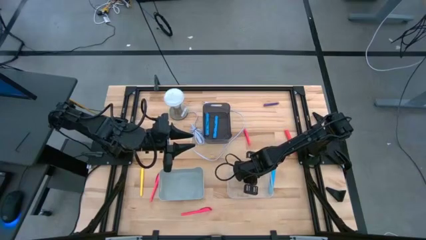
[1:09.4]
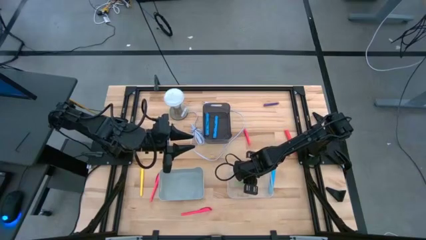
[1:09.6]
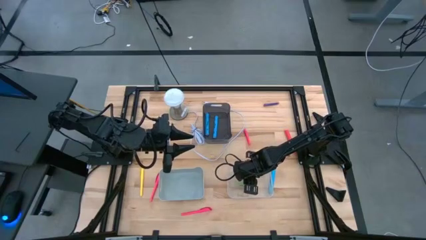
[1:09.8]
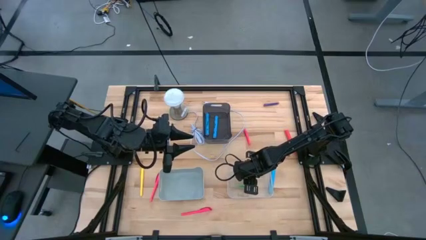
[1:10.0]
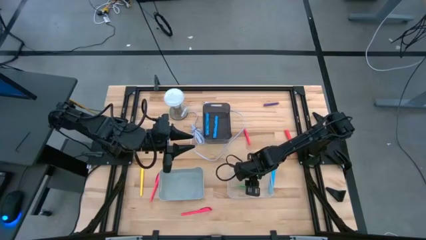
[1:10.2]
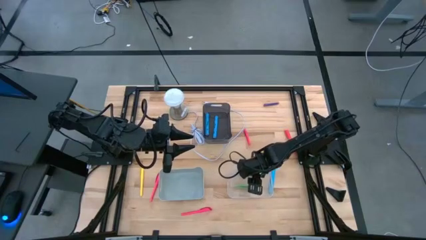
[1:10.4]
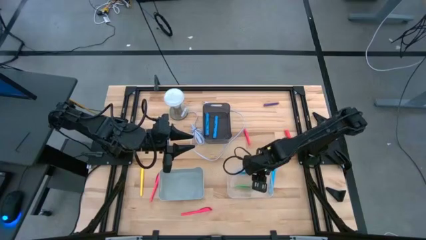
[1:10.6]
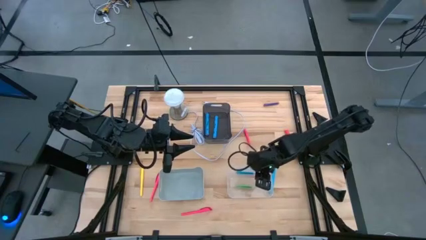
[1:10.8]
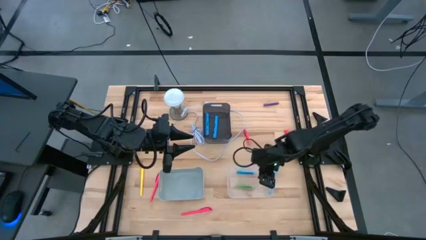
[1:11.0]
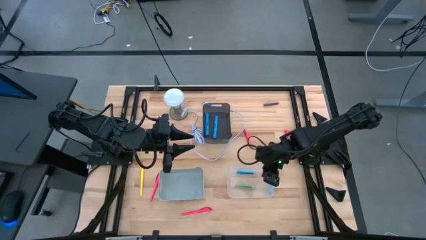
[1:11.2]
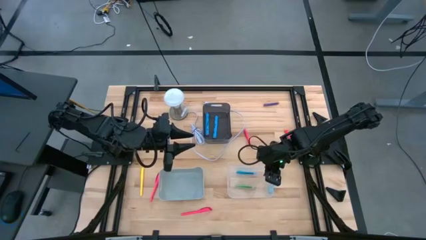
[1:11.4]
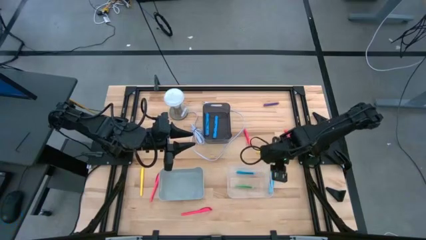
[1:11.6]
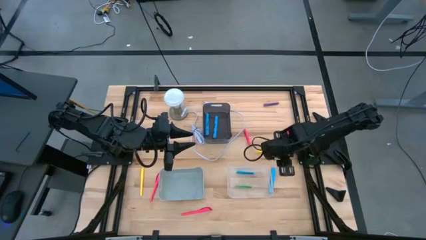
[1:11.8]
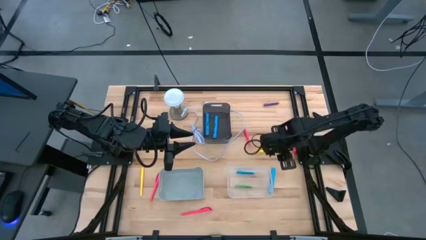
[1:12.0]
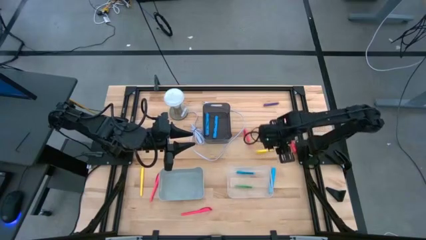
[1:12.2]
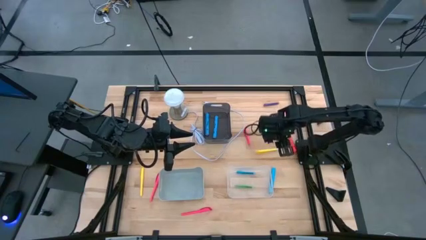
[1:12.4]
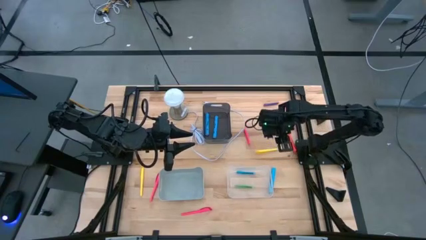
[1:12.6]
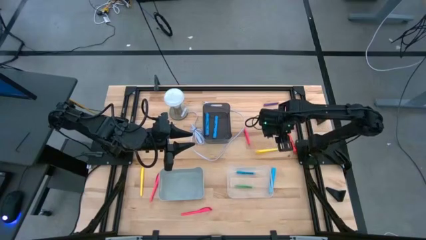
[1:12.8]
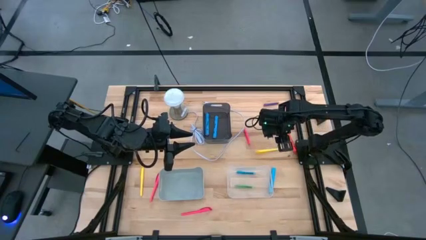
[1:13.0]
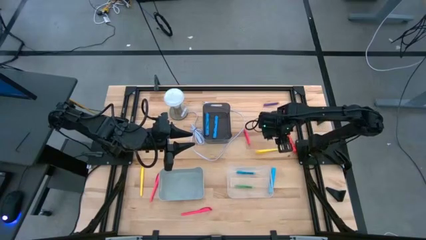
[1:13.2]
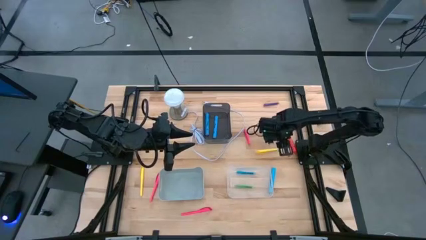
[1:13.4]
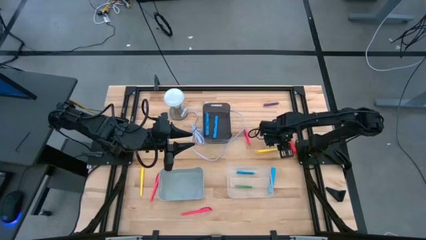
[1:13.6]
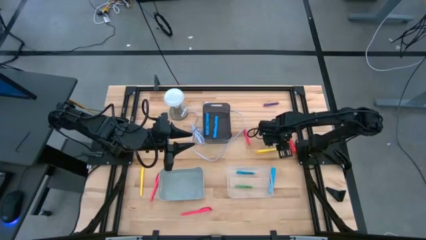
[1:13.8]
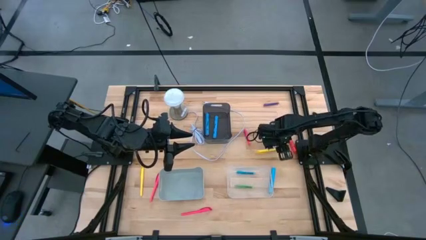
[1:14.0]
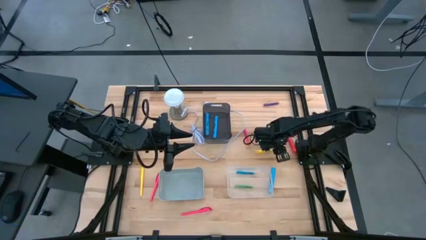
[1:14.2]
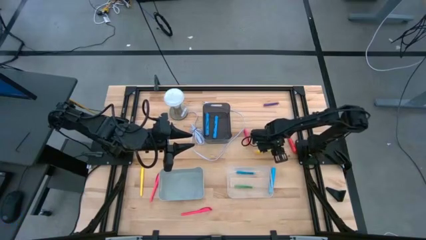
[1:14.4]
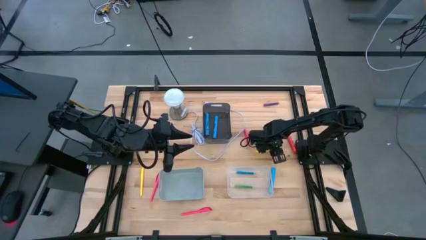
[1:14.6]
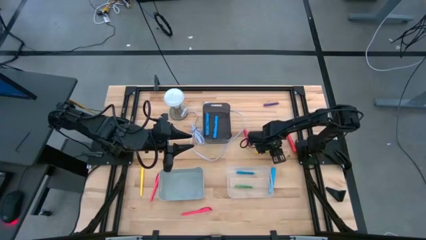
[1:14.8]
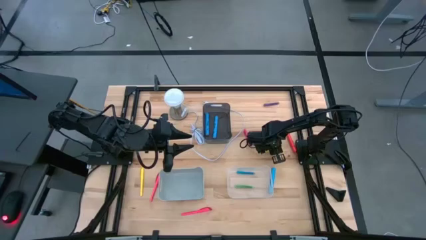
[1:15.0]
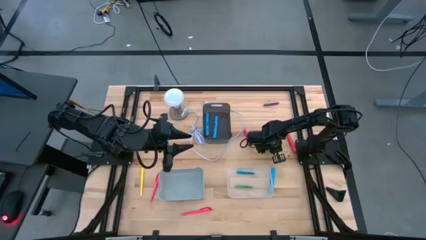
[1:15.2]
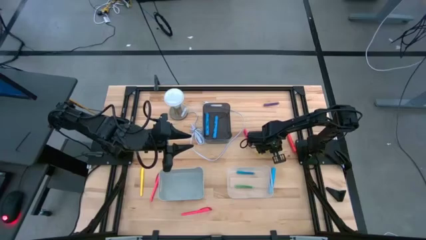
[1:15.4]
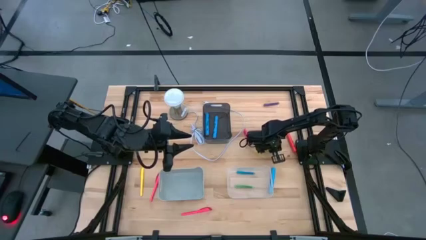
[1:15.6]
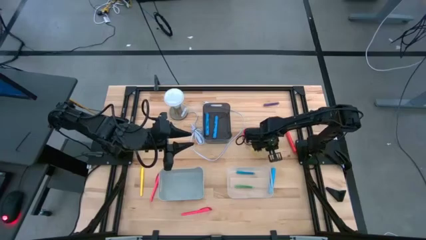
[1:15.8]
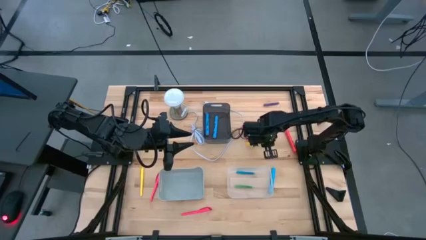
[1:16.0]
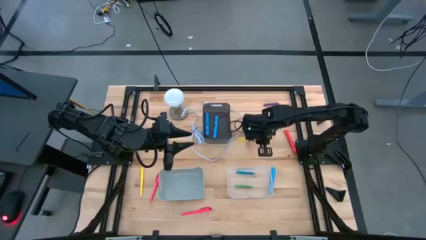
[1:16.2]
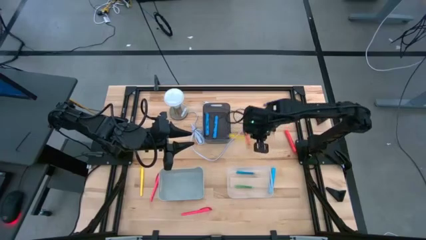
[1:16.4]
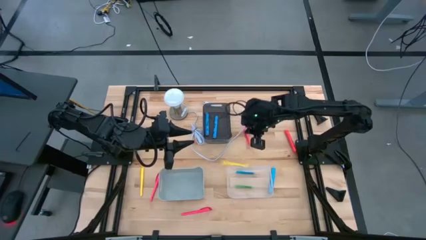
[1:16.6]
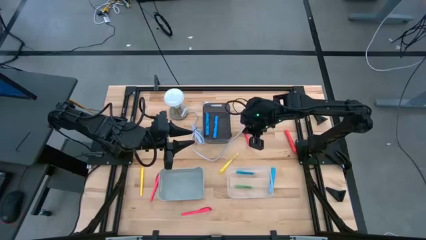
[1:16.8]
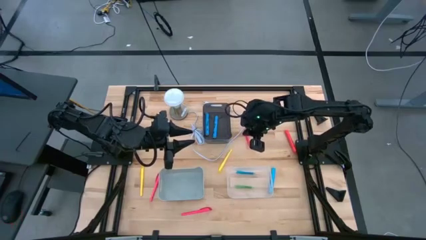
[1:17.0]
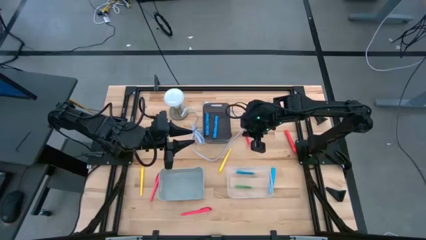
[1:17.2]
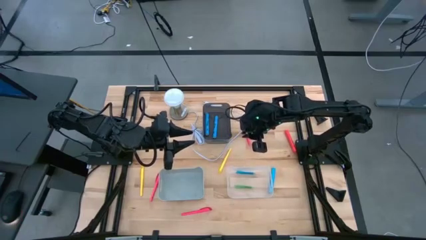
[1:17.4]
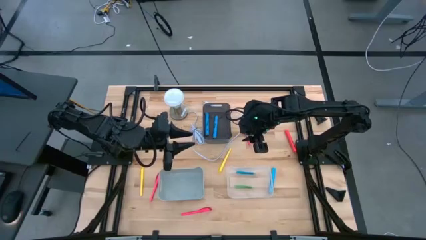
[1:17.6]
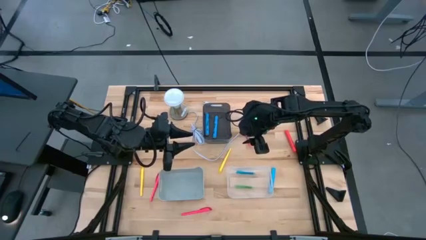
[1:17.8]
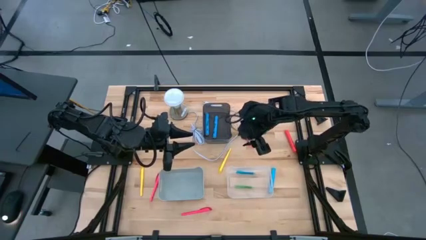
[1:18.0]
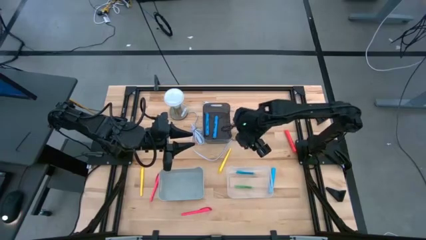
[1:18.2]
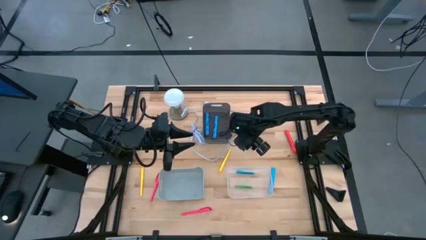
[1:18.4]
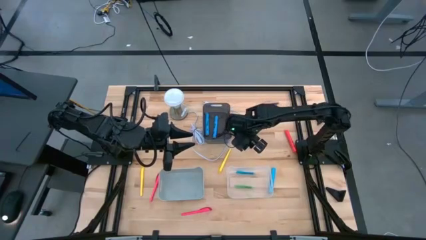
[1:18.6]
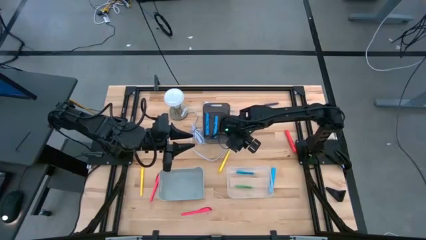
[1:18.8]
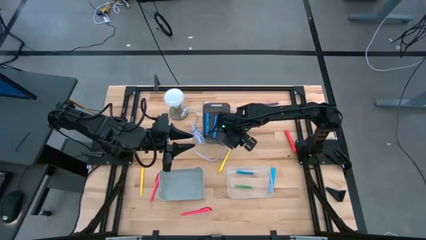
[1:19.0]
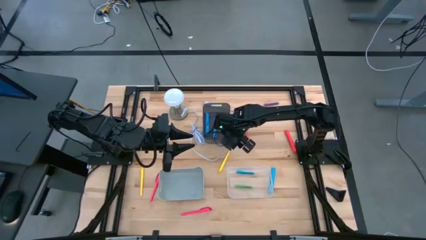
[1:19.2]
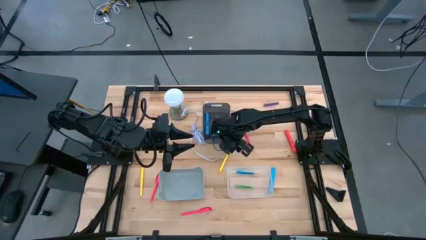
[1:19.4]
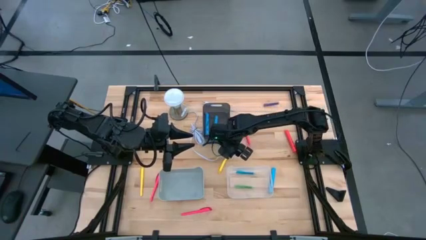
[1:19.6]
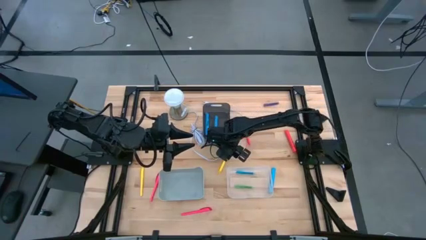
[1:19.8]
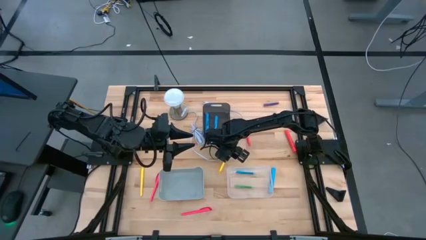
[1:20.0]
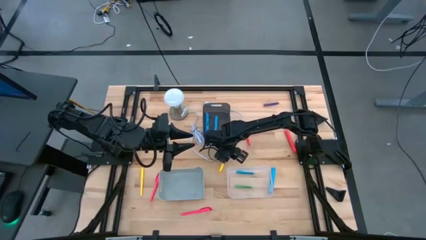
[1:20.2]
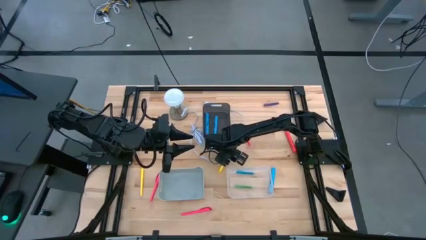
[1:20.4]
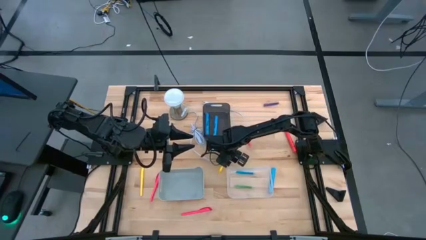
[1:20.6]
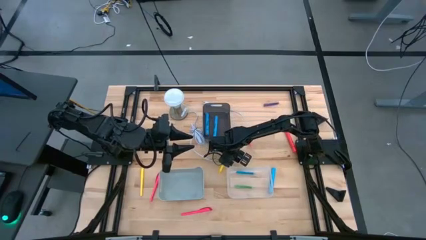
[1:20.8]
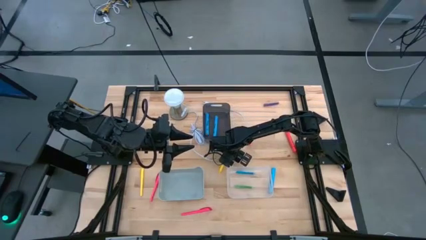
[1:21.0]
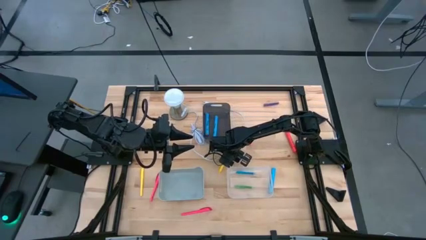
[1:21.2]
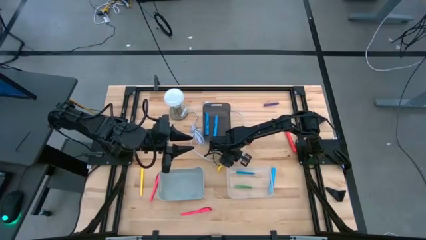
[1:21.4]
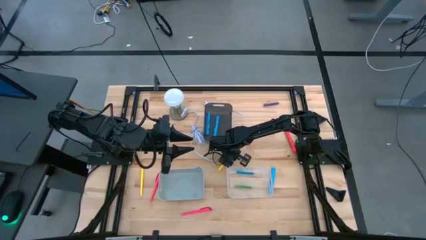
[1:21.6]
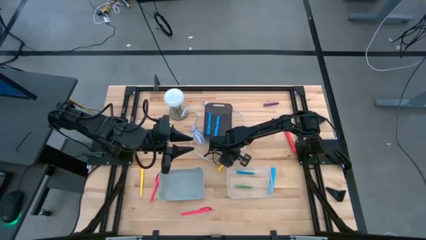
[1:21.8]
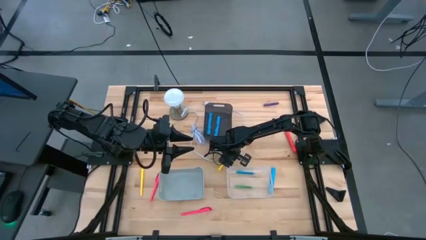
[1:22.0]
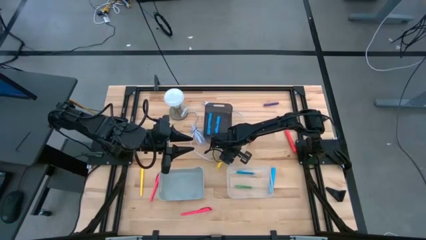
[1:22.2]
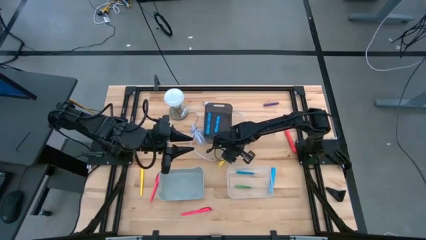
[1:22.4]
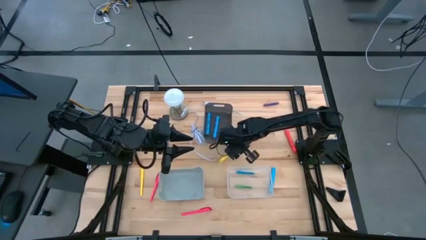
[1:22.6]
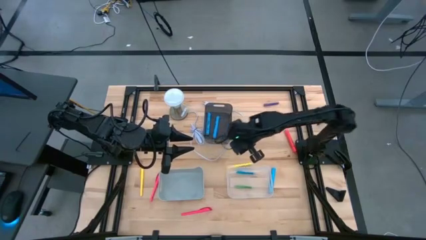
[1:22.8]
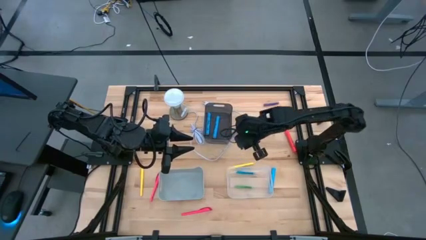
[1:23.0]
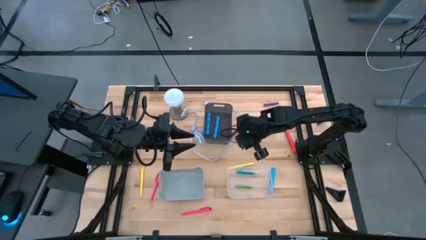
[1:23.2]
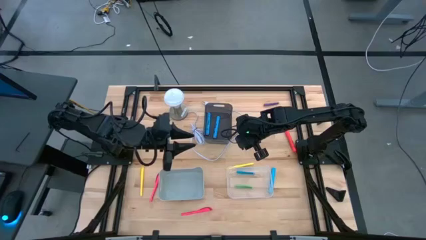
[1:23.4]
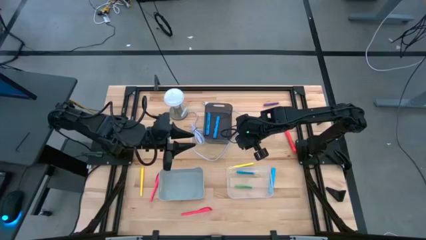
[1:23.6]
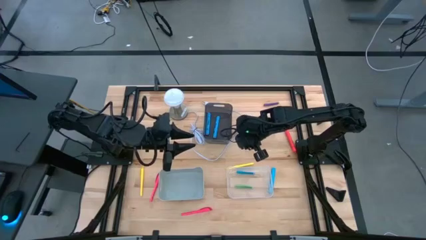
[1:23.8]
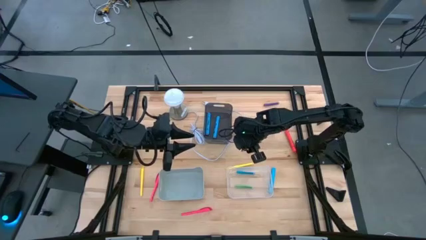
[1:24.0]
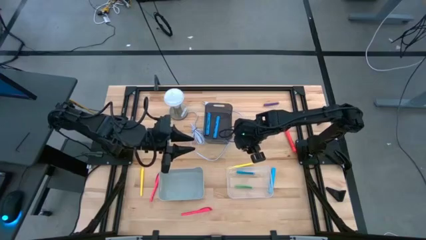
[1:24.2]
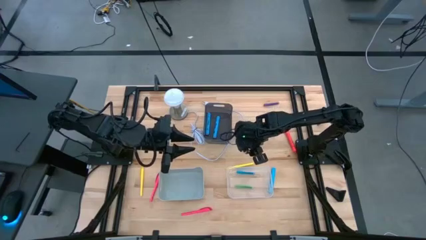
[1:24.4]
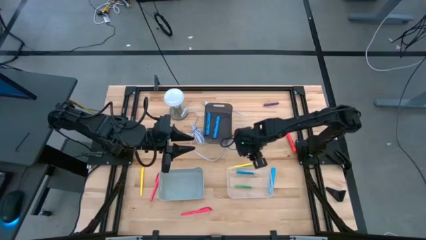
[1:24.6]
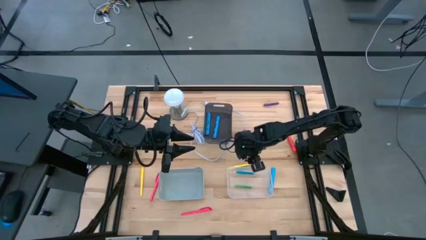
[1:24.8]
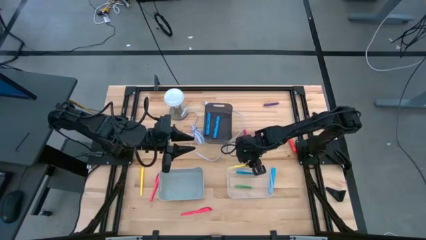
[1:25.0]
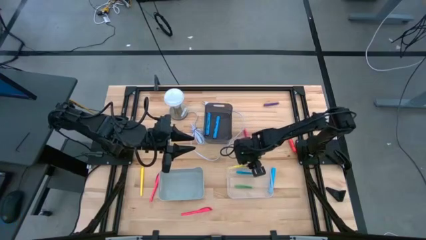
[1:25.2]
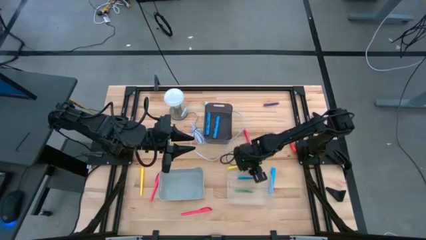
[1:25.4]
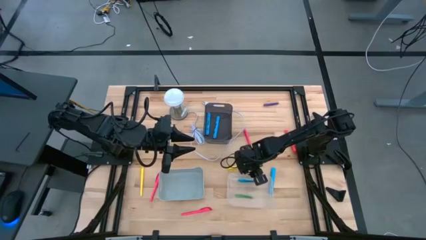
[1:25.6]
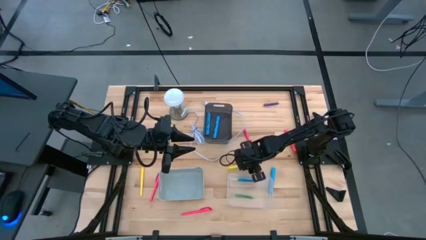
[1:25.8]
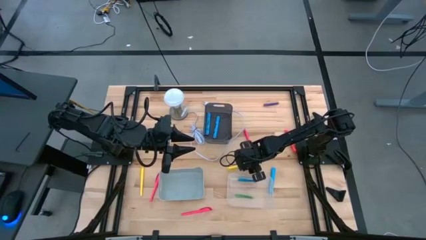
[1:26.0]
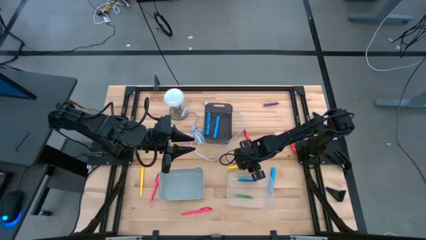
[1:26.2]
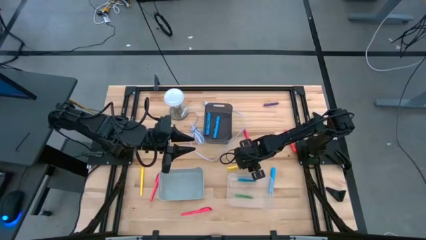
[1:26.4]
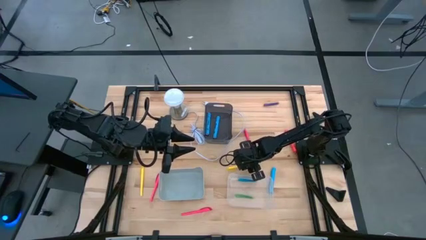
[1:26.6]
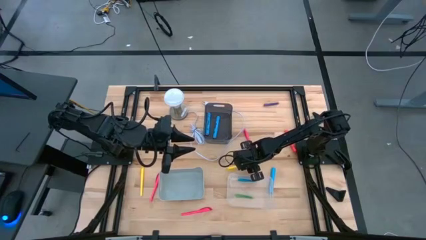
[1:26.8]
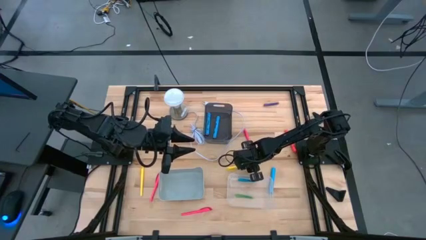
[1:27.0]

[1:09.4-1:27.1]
Task: Pick & Place Markers
Put the top yellow highlighter pen into the gray bin
